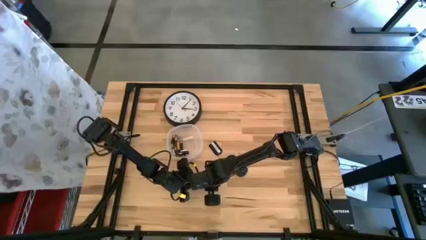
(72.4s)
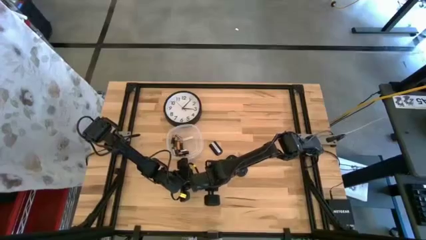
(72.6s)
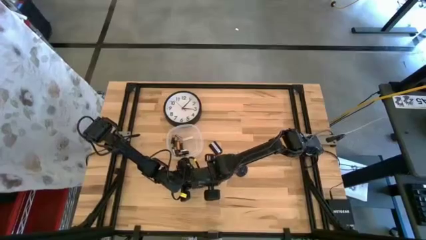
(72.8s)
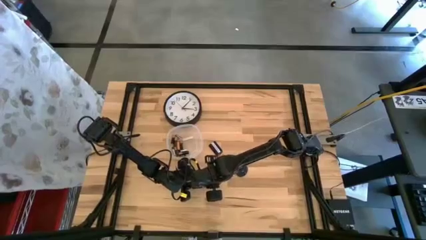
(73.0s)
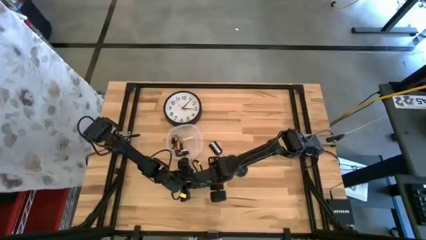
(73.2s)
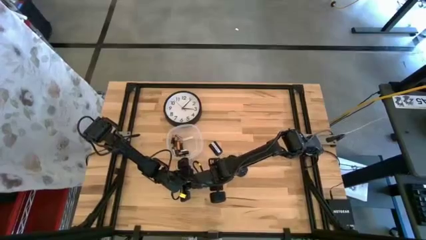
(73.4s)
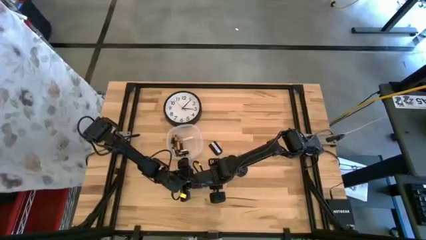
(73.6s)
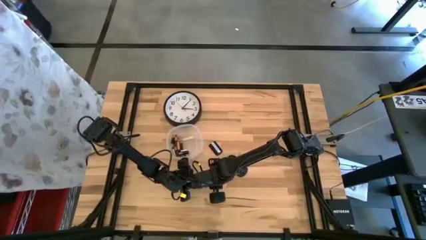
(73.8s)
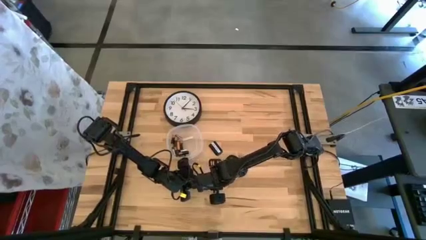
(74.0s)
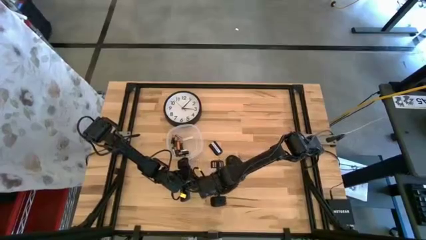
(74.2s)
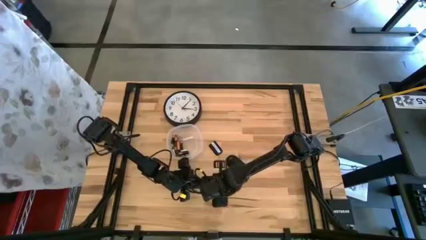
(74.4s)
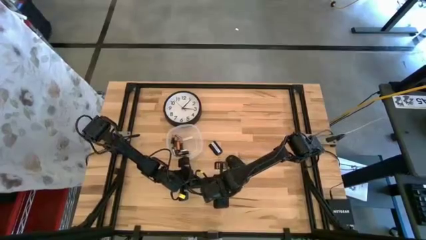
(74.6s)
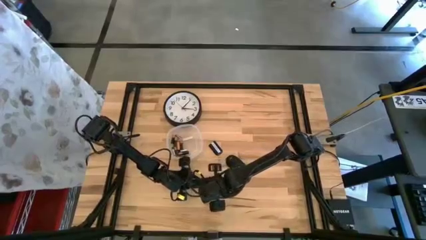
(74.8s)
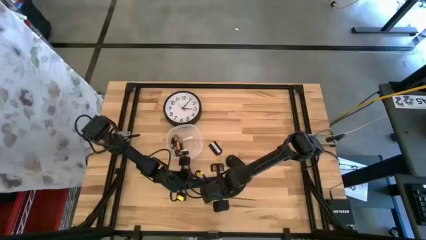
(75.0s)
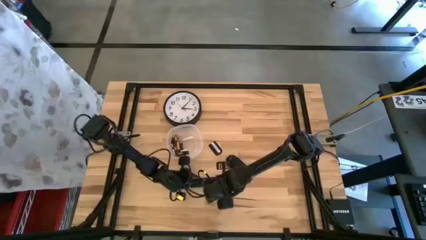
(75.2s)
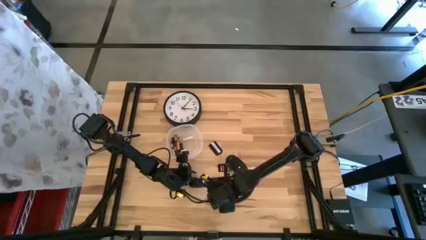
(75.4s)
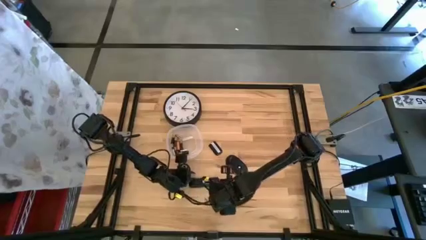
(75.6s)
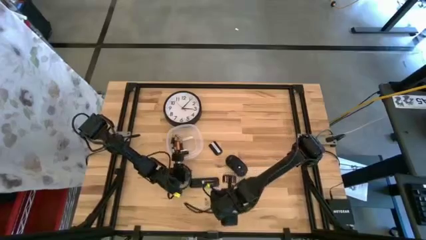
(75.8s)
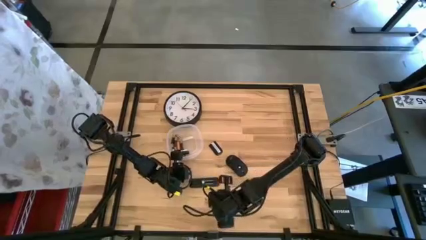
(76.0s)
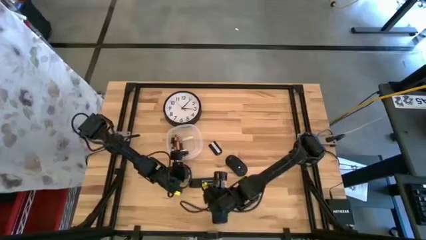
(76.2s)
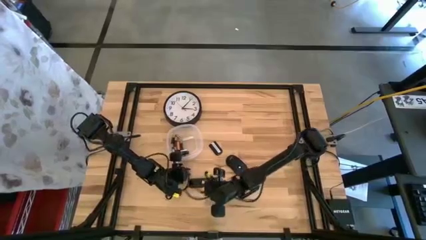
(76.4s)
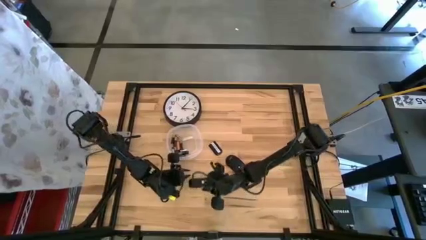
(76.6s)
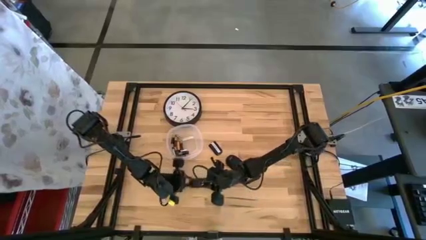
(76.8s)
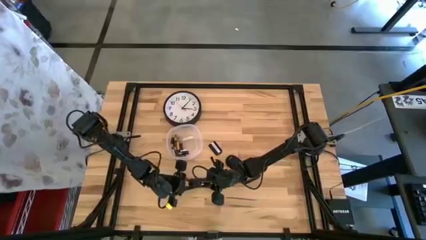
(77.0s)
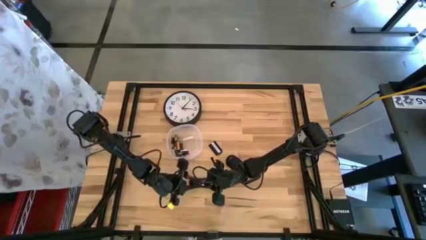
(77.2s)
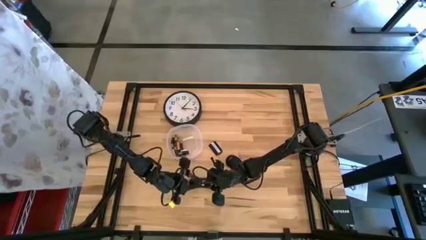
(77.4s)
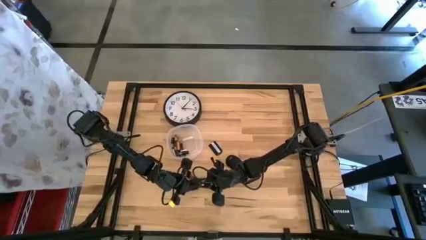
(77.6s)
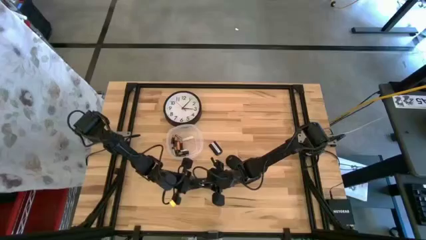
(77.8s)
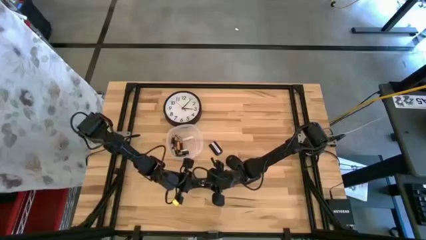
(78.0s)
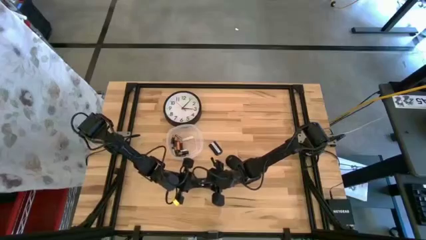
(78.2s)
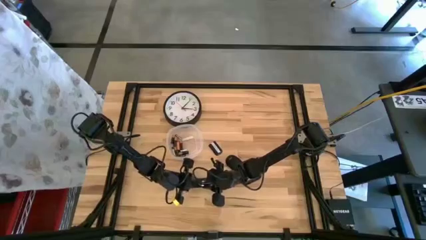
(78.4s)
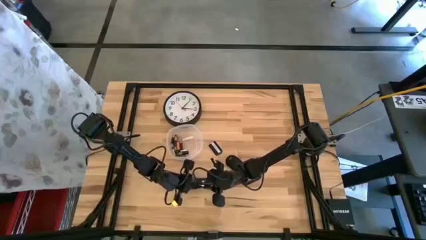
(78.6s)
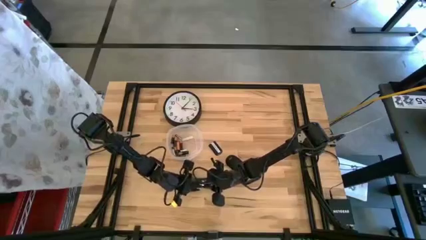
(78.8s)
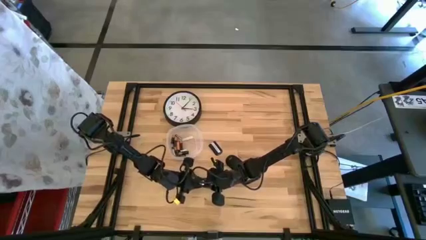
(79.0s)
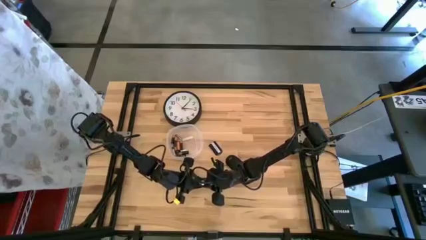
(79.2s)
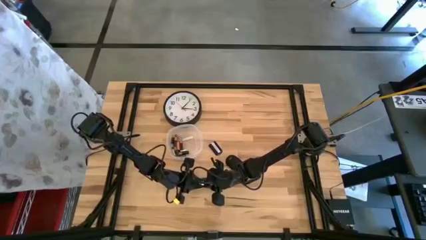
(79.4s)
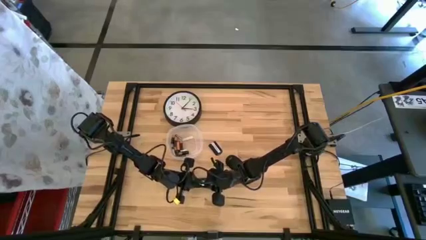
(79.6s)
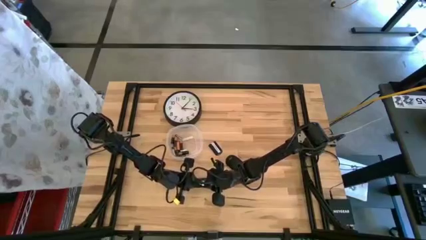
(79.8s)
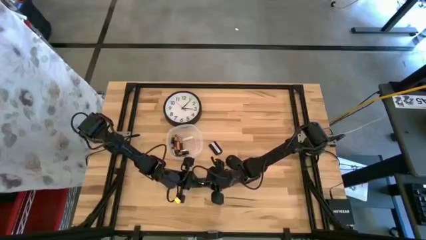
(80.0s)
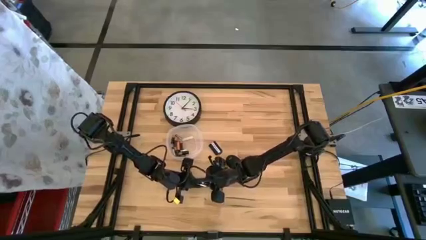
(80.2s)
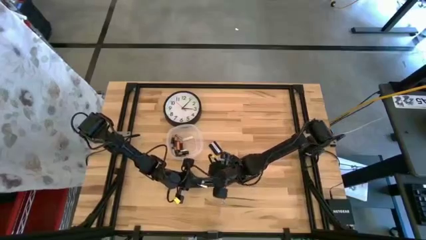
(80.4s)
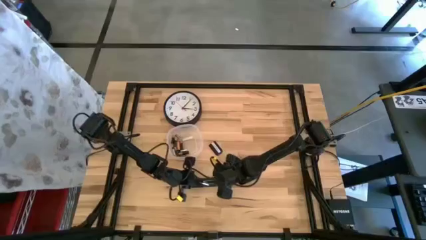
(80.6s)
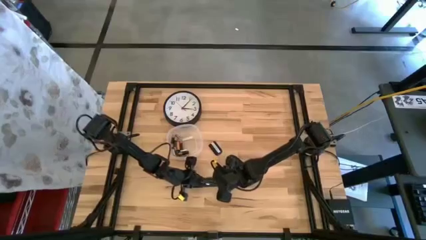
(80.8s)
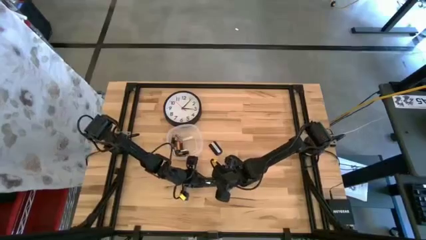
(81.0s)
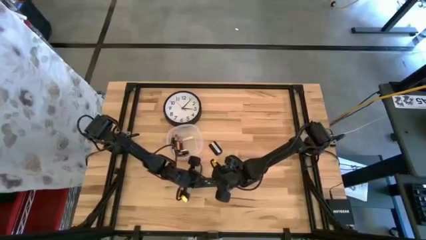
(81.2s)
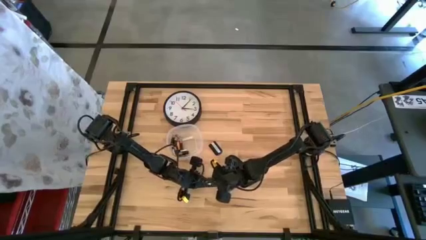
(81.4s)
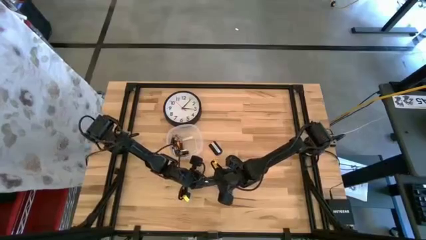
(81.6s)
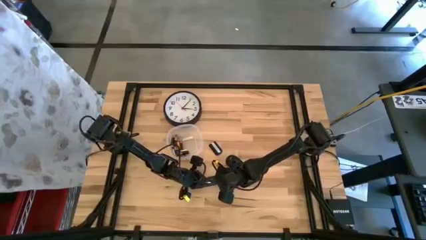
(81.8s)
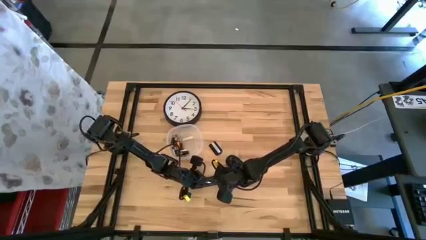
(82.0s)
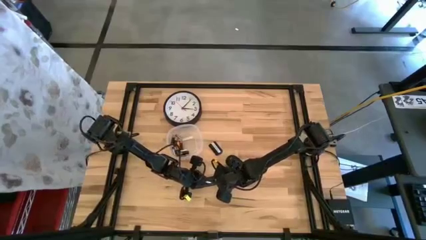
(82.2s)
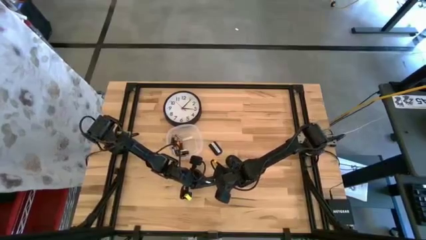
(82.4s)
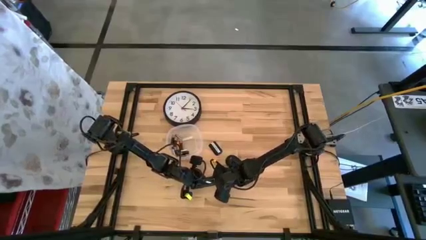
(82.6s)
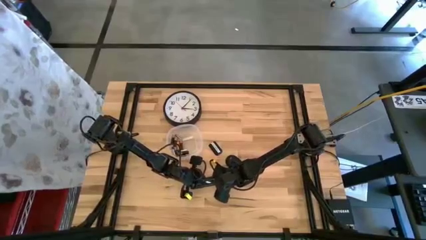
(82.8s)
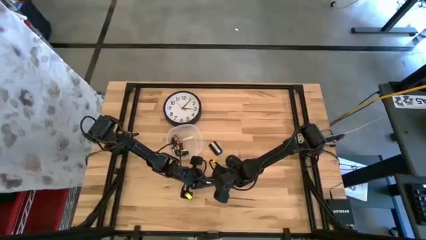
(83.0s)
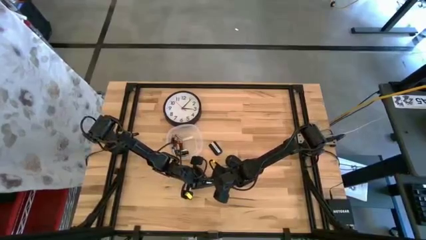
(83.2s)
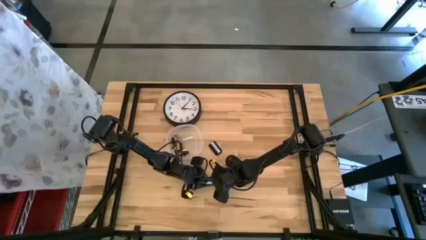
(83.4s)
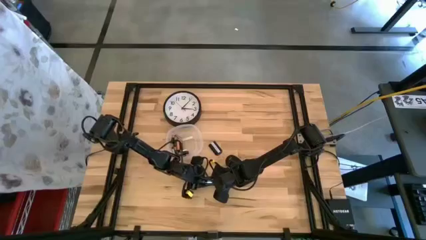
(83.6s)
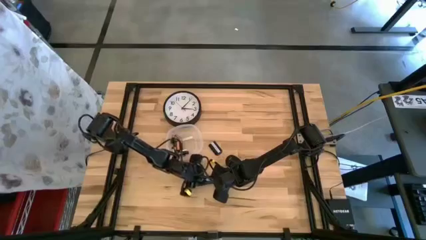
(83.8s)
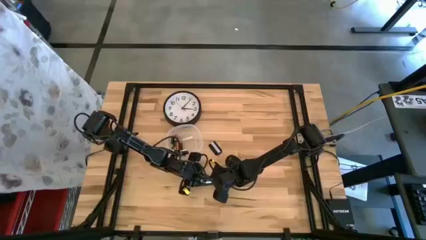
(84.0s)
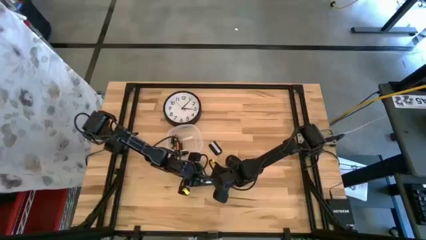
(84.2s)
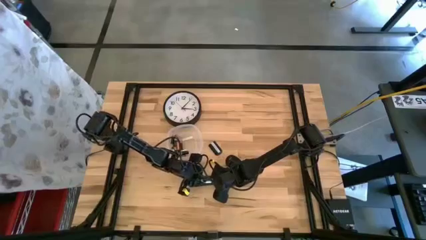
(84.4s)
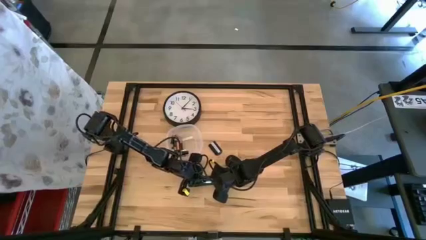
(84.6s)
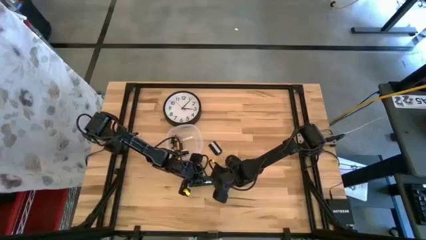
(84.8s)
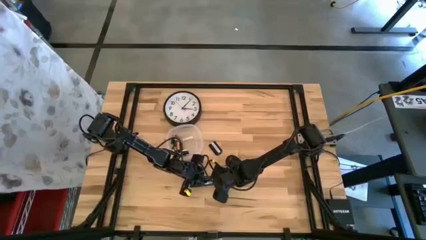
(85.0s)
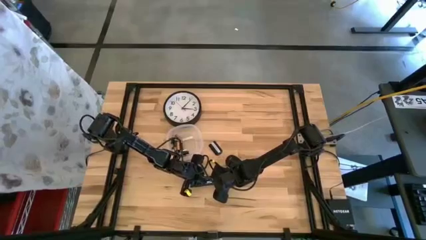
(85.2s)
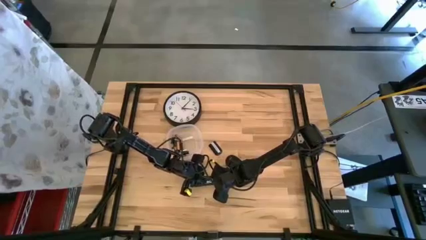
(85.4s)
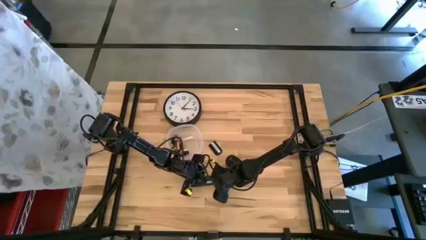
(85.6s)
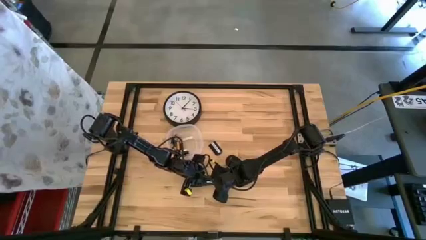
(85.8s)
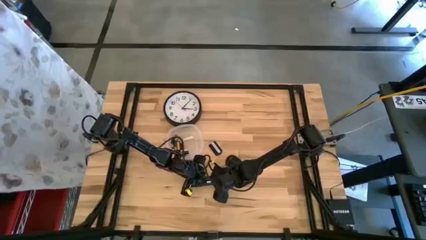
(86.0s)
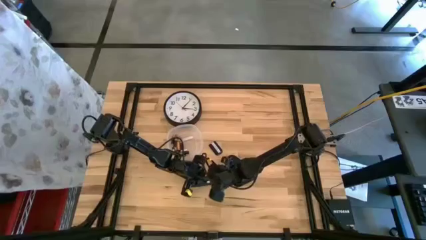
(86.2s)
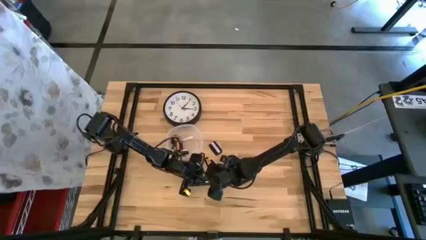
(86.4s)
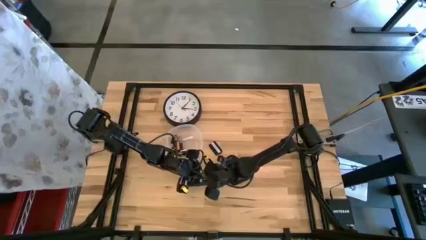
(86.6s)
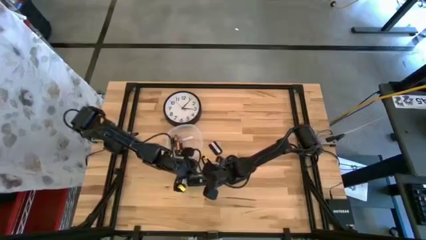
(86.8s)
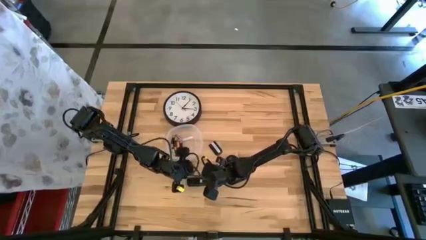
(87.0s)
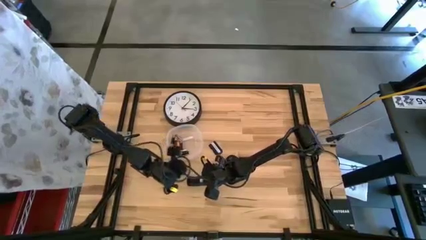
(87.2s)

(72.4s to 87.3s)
Task: Insert battery
Insert the silver battery into the remote control
